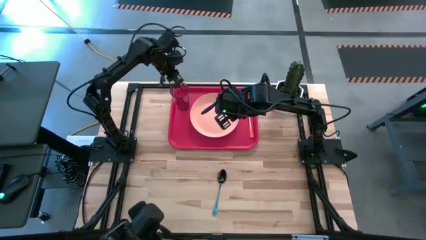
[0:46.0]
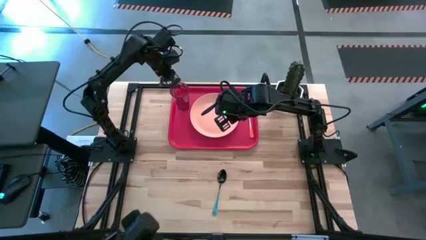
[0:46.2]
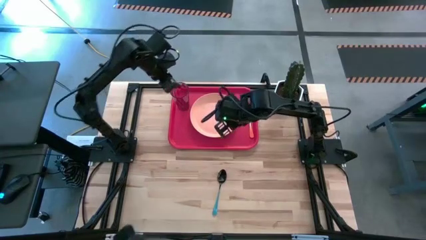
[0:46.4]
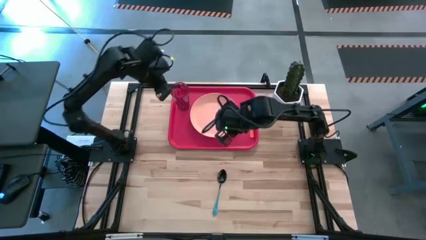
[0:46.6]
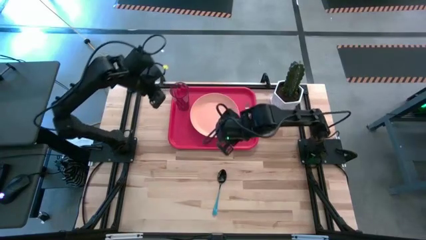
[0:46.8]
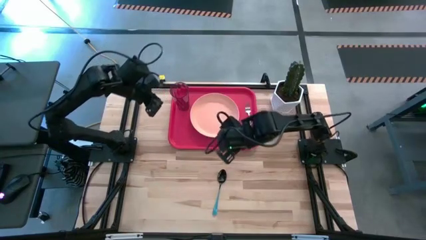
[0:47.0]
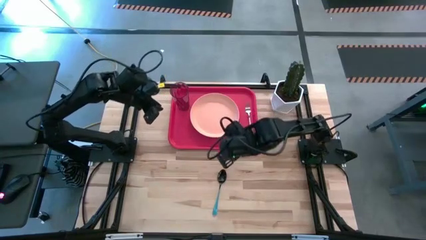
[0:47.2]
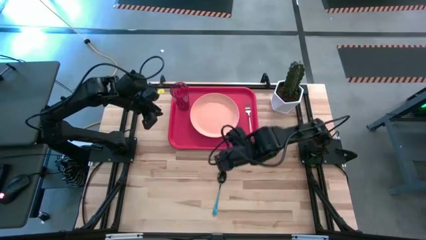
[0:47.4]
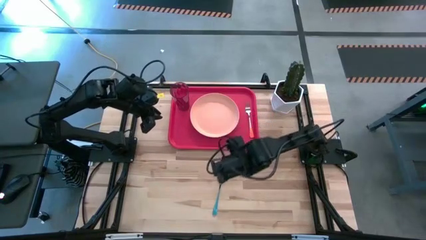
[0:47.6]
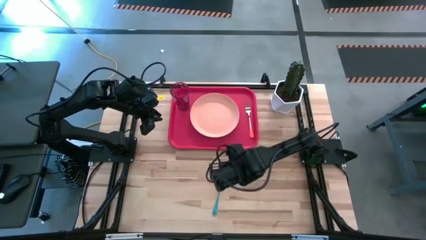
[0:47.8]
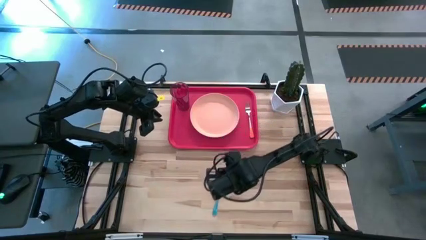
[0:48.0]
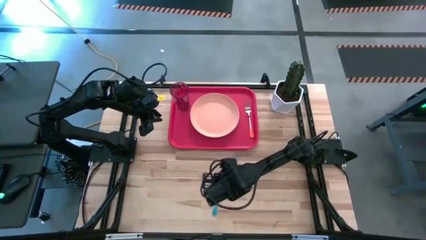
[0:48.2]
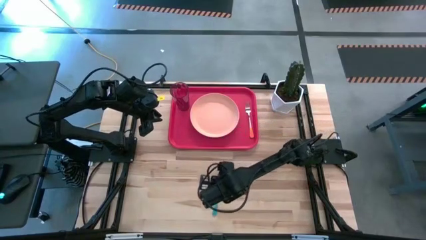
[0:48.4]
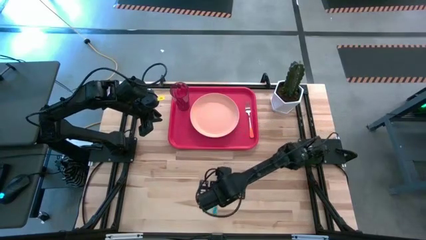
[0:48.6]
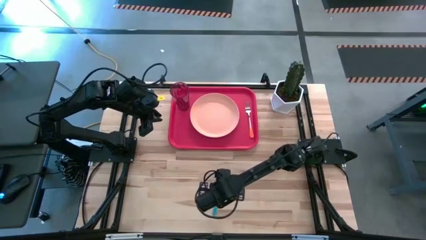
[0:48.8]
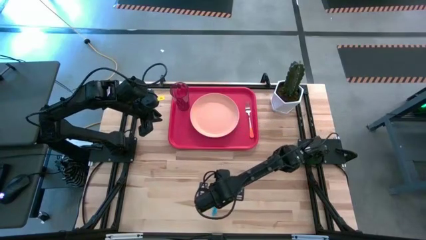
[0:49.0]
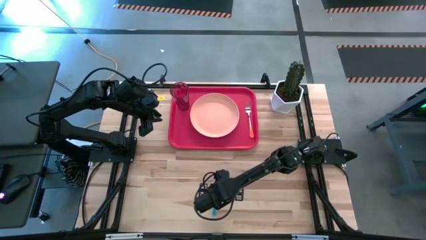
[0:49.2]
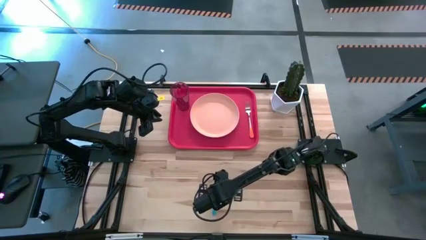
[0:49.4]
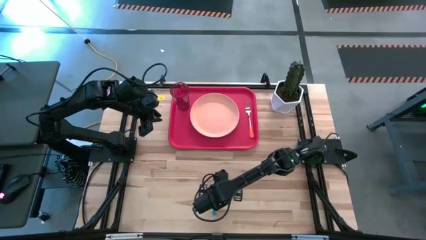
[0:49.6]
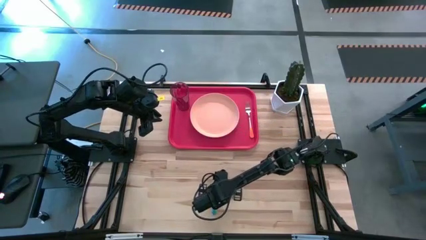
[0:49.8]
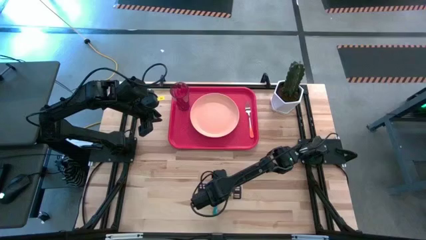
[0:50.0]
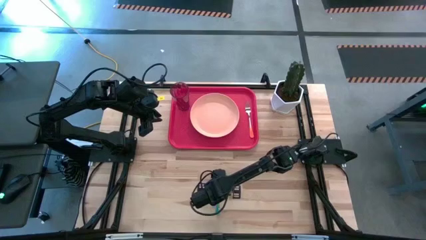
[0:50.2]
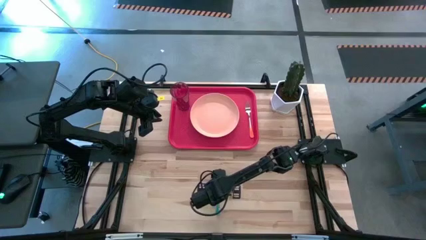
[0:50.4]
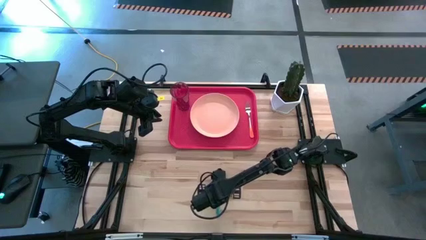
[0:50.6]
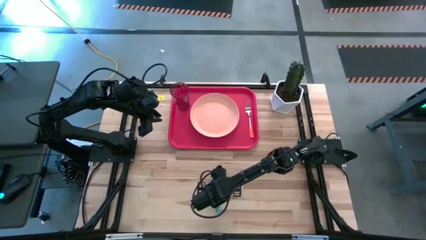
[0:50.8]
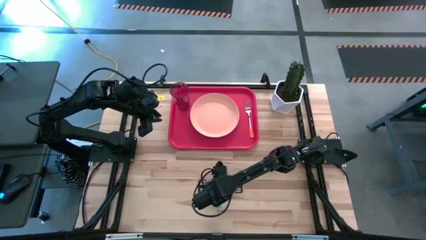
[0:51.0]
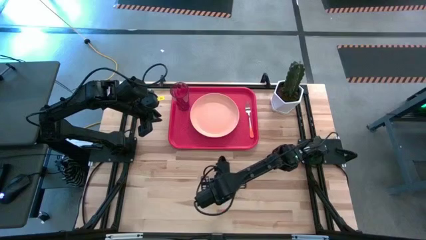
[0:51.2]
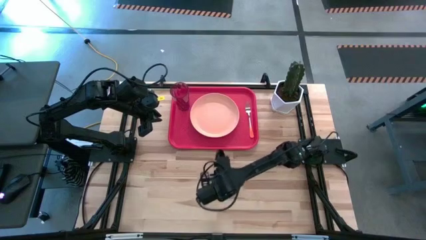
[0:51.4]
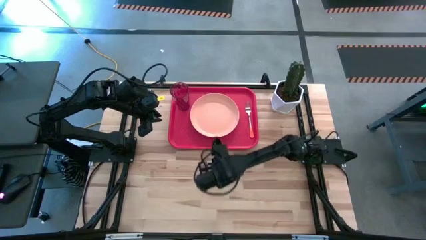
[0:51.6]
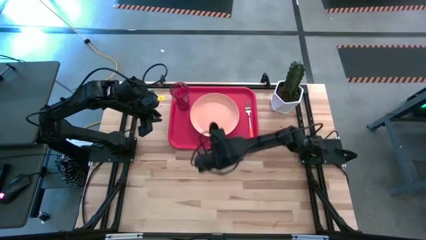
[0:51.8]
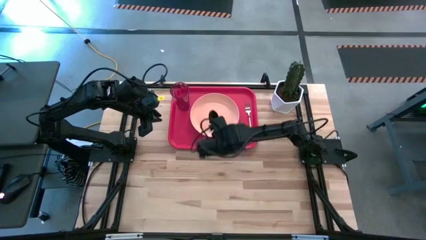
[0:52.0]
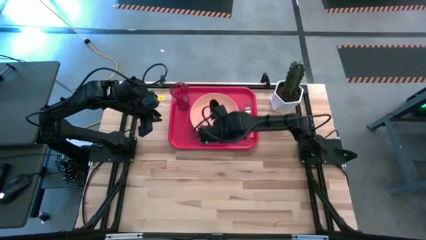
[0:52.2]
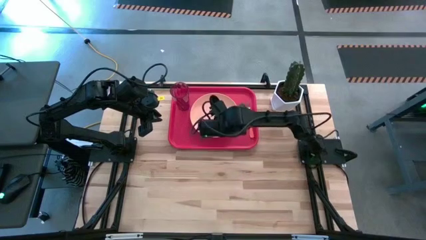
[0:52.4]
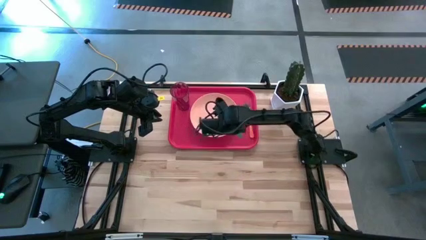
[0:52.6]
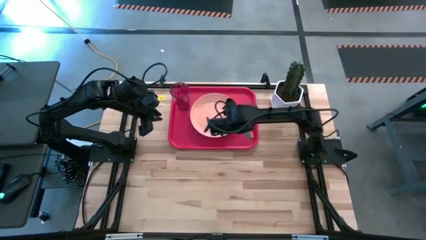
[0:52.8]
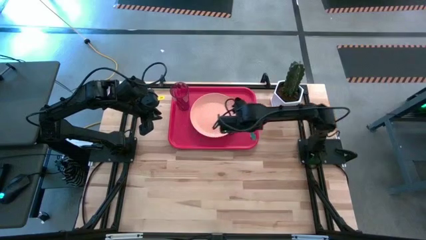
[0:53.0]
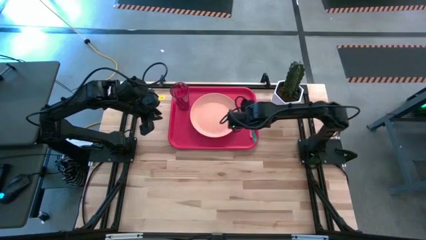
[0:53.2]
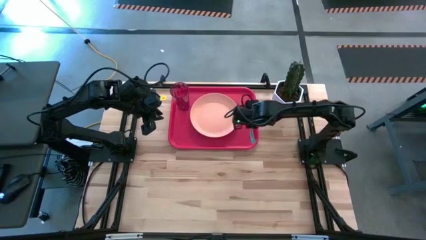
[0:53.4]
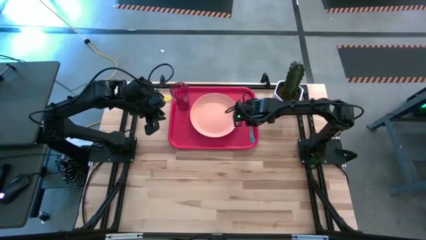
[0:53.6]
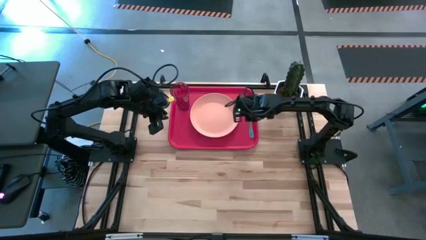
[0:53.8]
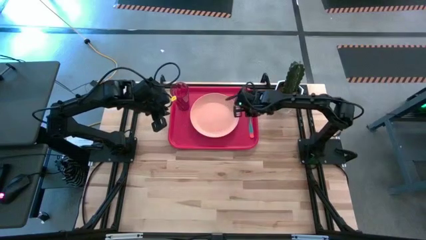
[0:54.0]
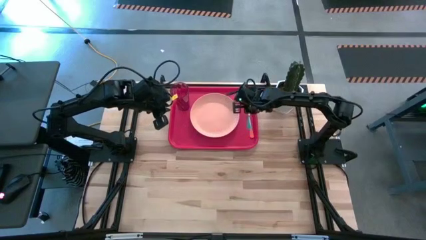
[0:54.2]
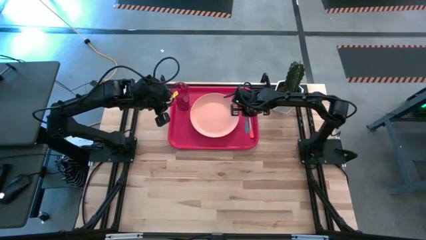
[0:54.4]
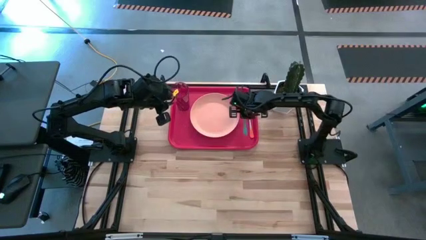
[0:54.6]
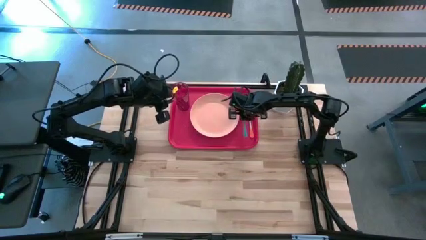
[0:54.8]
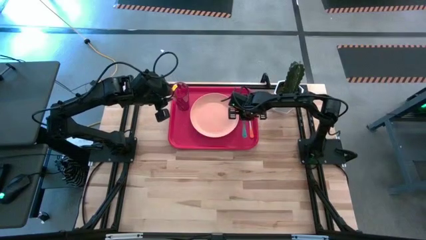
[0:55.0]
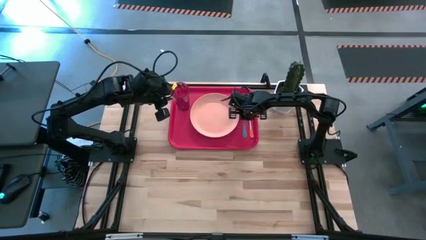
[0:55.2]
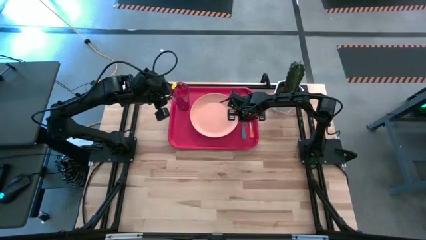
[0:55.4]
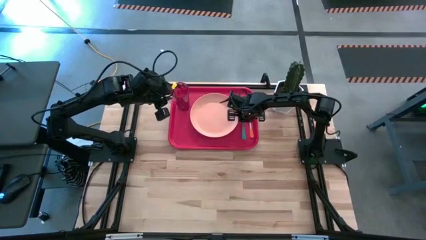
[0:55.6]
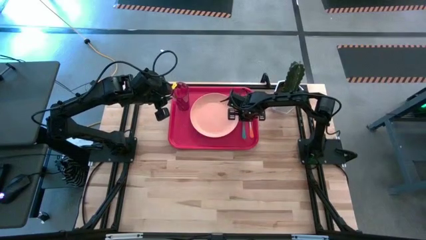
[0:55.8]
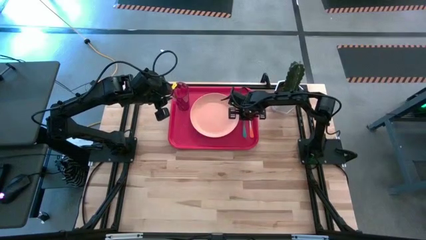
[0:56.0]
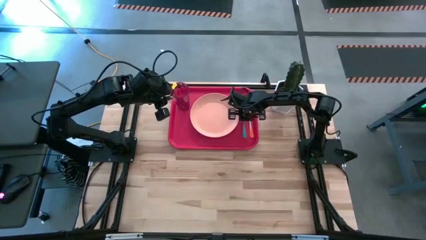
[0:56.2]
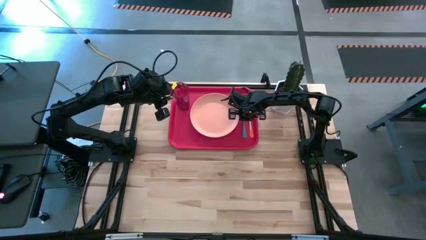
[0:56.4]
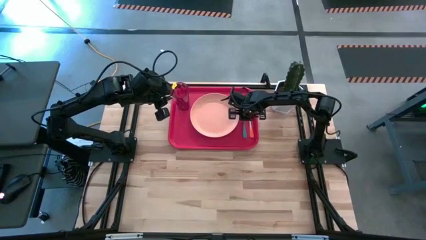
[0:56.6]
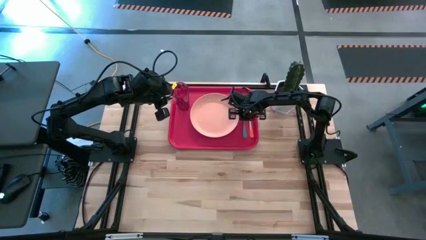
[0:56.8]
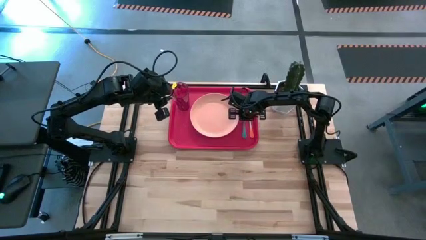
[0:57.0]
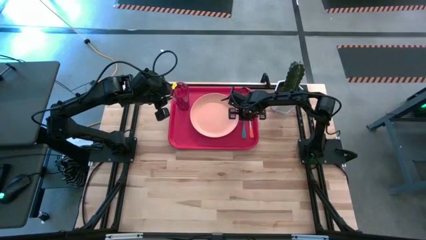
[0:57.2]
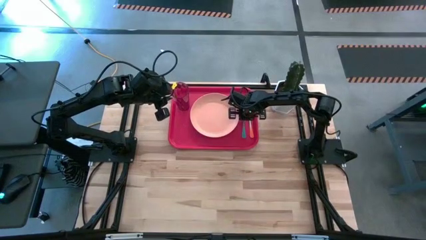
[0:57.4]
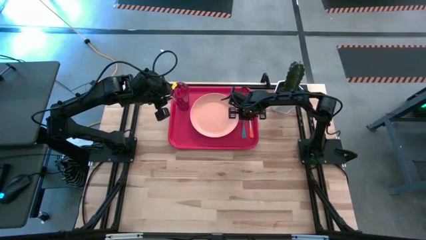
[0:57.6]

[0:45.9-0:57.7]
Task: Pick and place plate/cup/fork/spoon on tray
Put the blue spoon on the red serving tray to the left of the orange fork

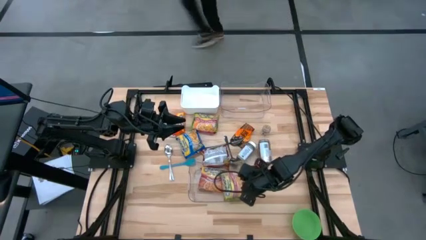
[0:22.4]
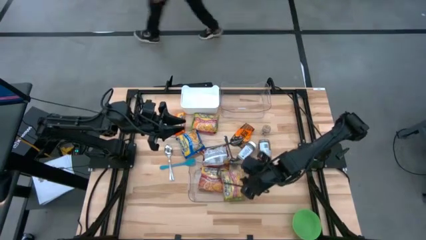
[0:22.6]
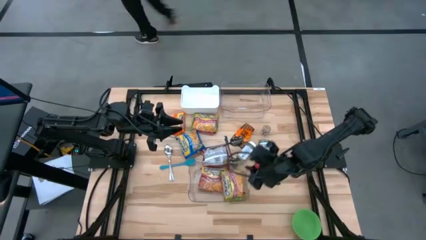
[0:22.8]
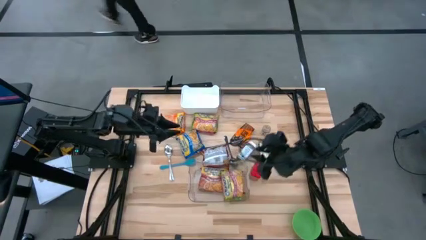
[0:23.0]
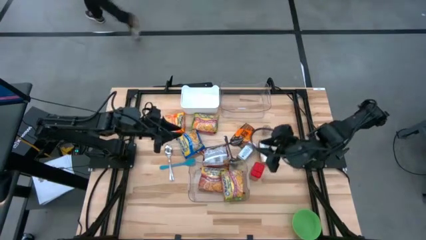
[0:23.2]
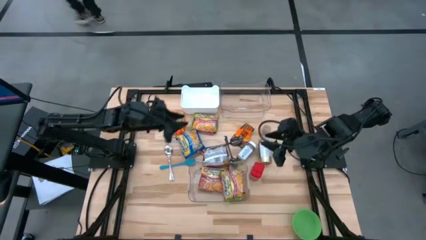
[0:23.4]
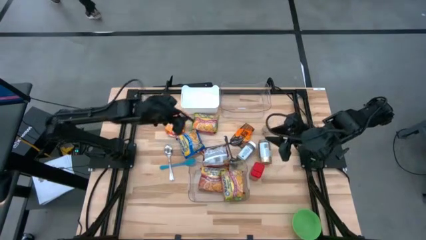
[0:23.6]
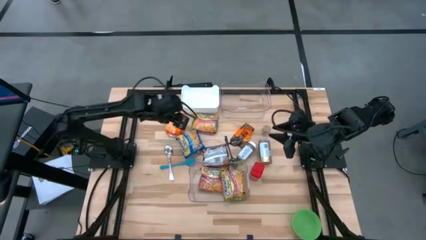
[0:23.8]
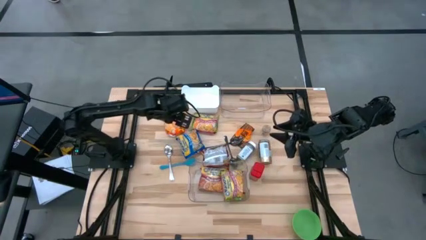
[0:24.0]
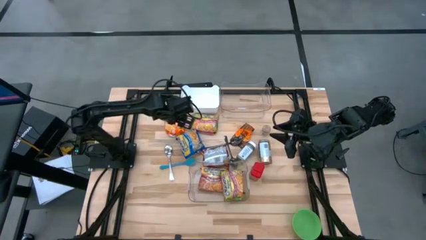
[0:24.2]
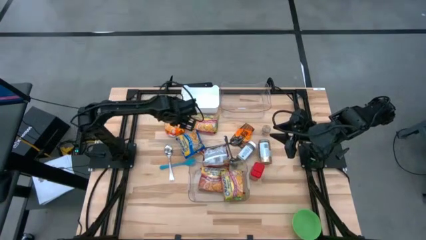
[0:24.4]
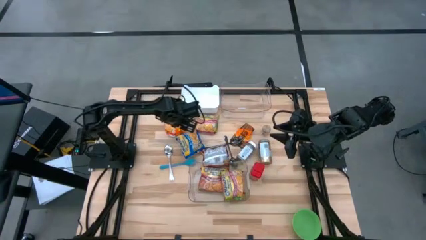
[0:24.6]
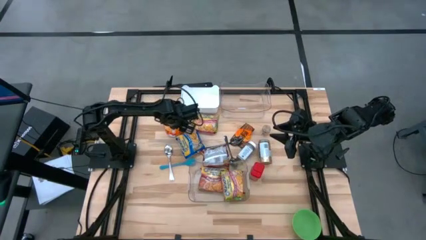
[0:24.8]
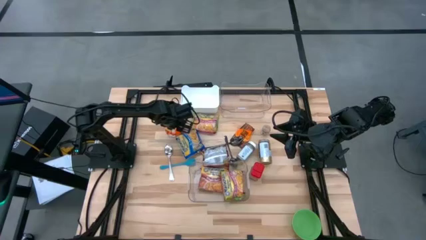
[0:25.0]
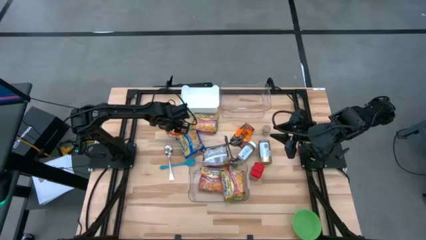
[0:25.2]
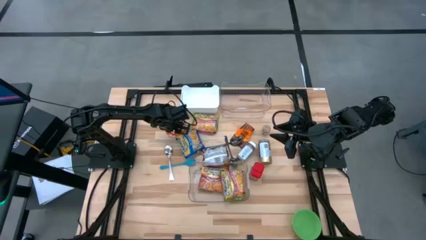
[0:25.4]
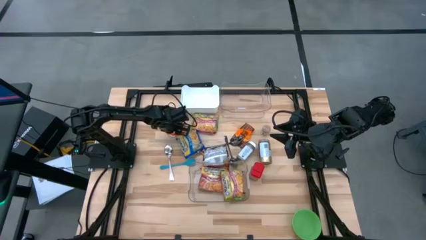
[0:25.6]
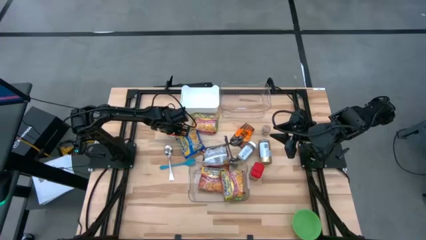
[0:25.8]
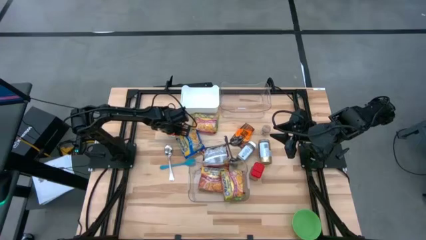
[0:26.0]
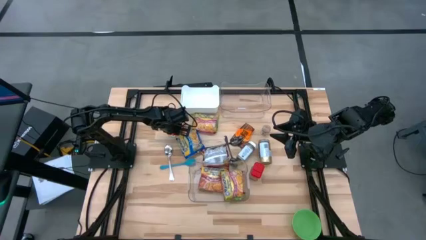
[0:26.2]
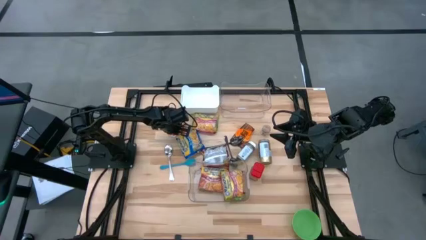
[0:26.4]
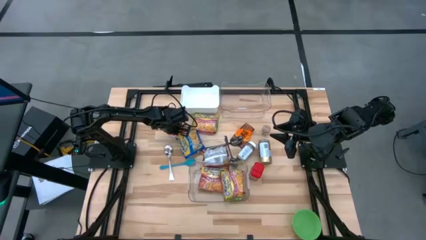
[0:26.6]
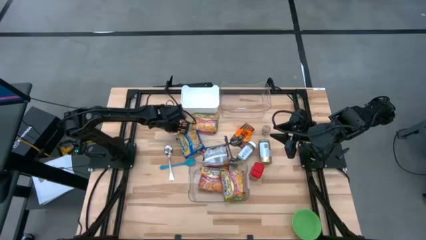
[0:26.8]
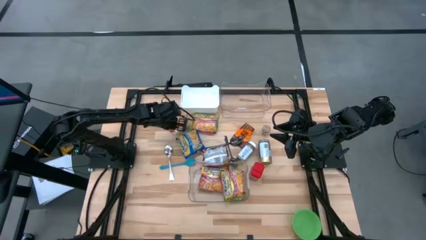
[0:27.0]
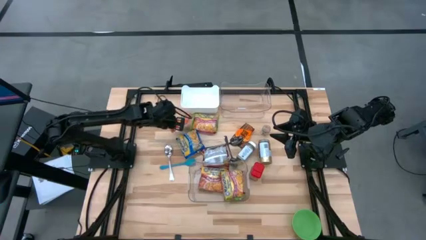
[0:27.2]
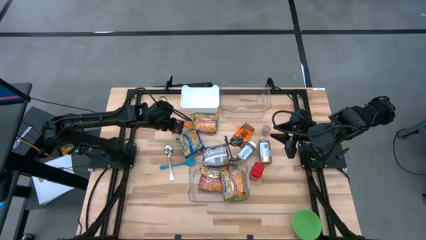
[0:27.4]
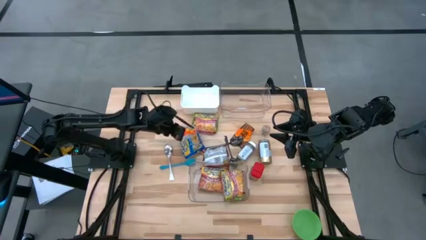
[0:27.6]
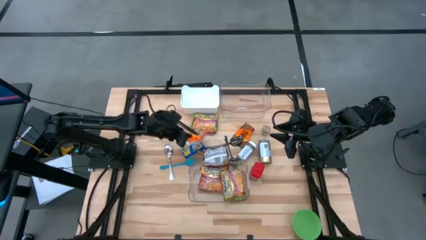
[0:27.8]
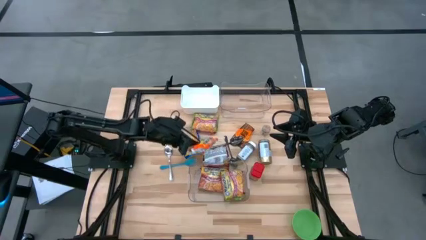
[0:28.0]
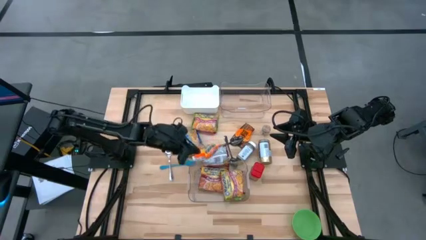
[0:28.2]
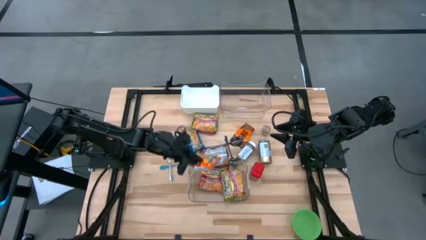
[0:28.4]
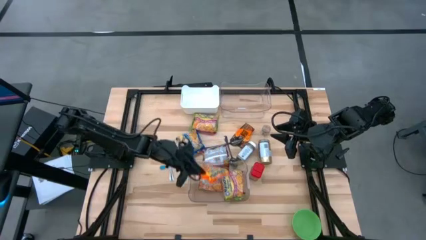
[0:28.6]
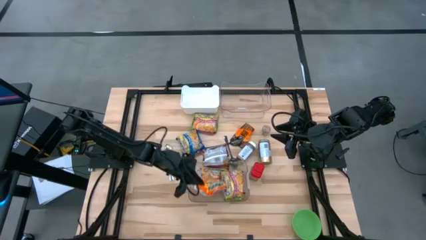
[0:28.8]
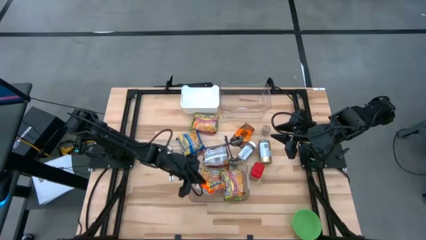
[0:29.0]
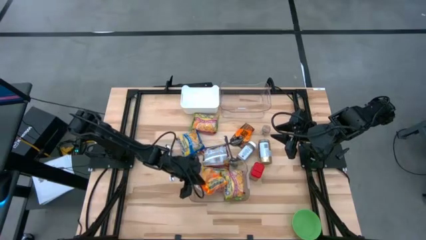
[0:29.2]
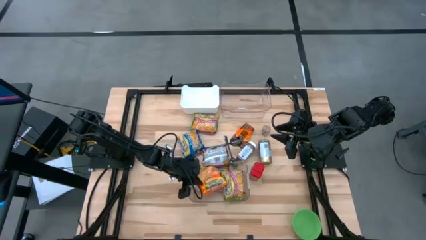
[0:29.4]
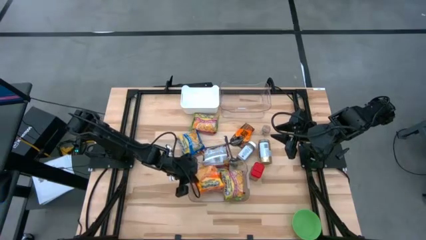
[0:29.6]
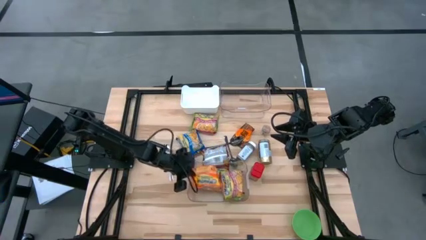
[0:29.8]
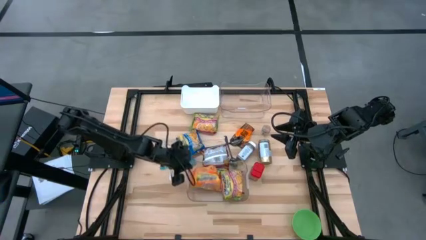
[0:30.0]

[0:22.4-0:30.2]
Task: Pick & Place Food Item
Put the orange noodle pack into the bottom transparent bin
